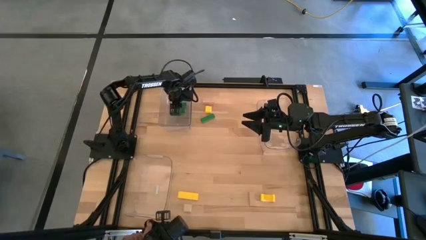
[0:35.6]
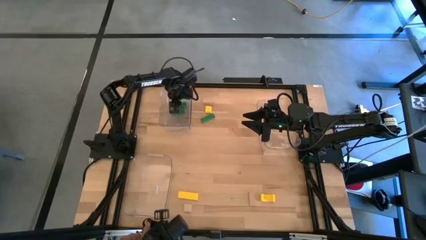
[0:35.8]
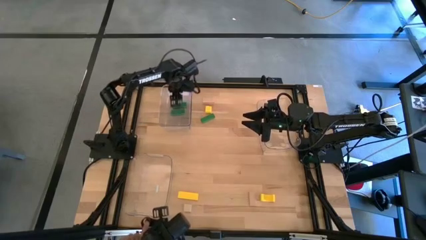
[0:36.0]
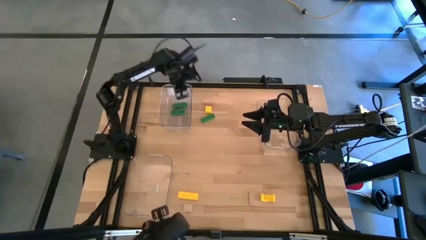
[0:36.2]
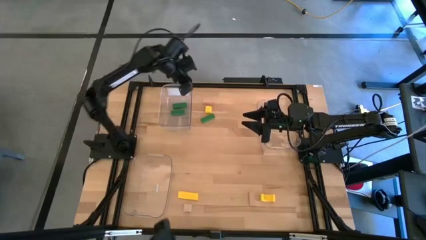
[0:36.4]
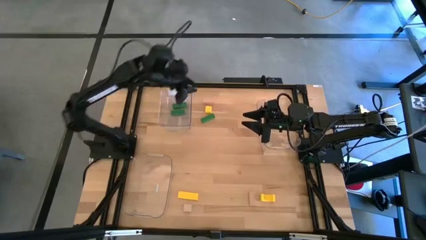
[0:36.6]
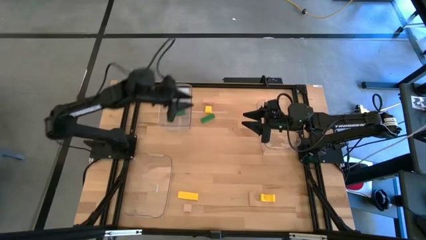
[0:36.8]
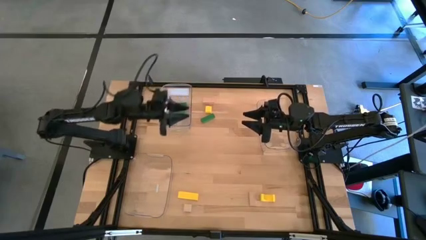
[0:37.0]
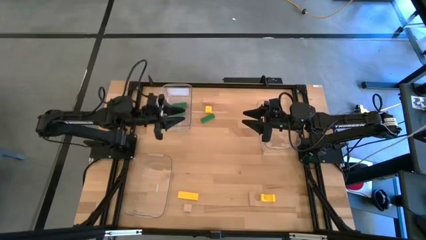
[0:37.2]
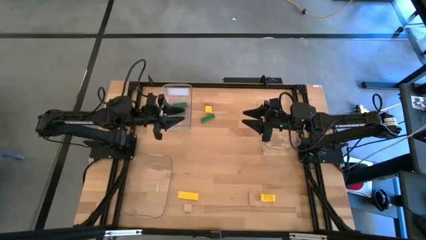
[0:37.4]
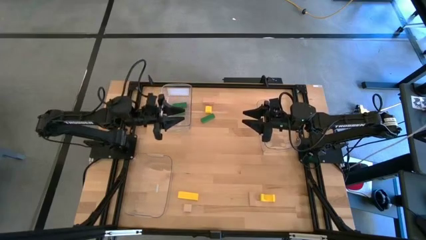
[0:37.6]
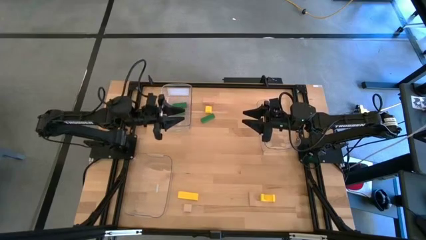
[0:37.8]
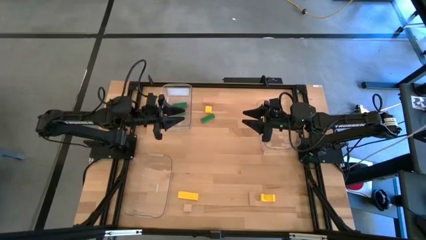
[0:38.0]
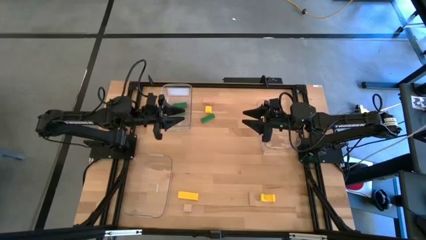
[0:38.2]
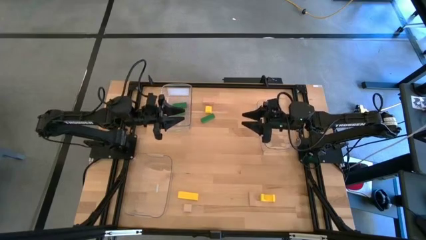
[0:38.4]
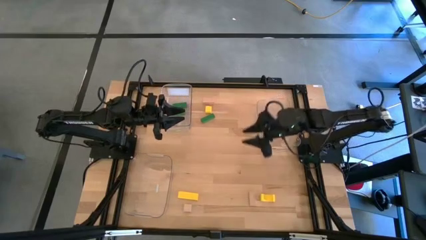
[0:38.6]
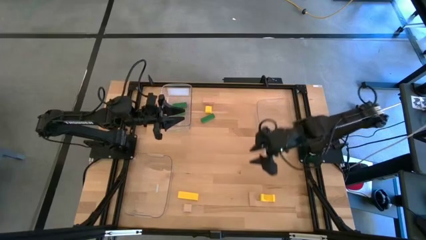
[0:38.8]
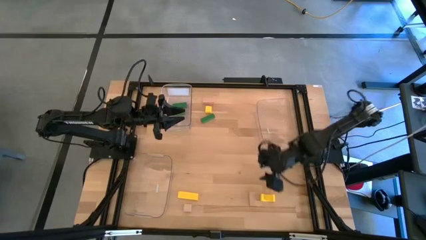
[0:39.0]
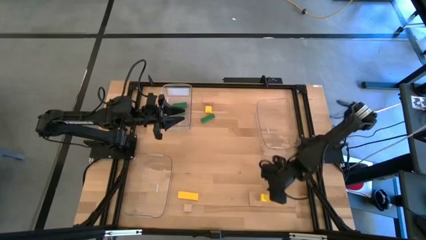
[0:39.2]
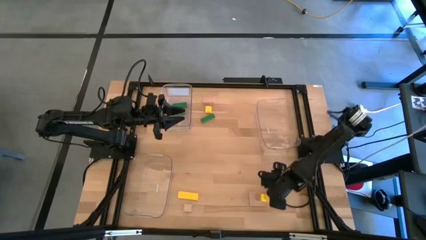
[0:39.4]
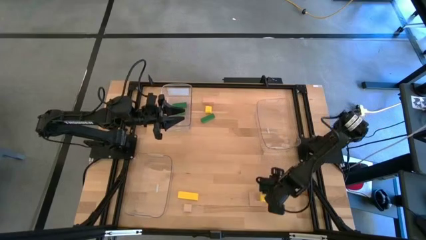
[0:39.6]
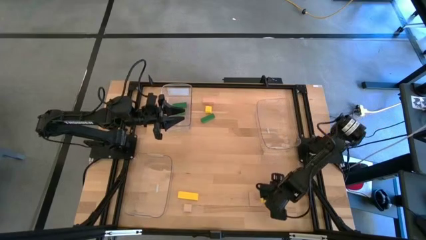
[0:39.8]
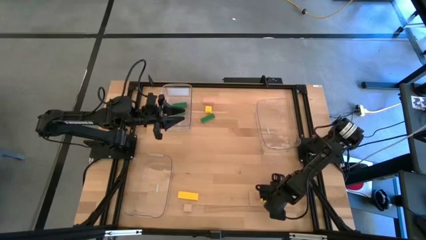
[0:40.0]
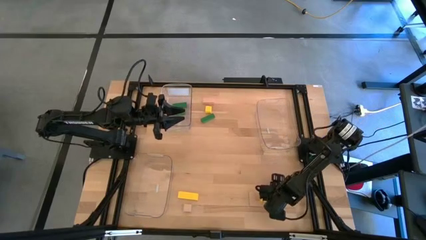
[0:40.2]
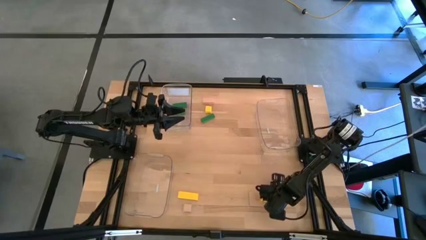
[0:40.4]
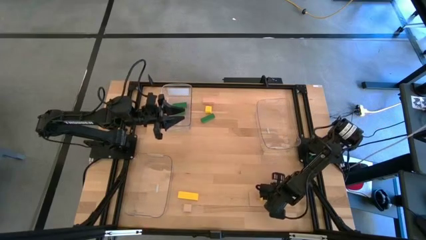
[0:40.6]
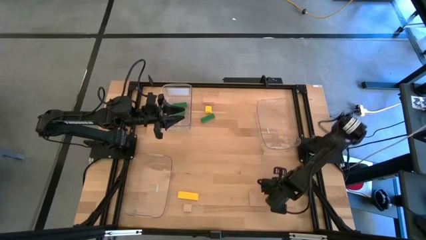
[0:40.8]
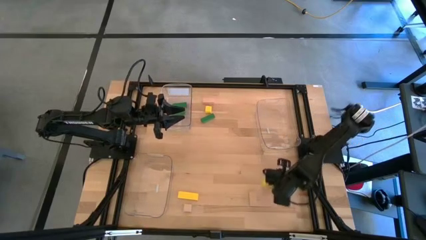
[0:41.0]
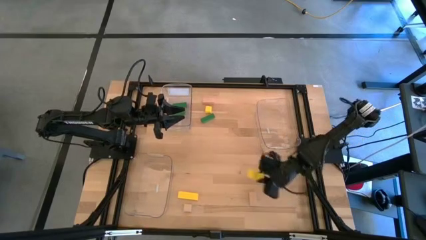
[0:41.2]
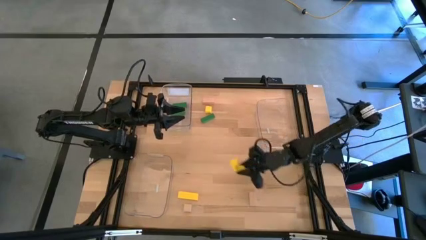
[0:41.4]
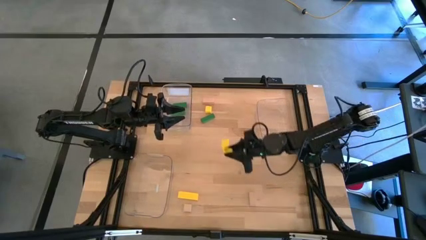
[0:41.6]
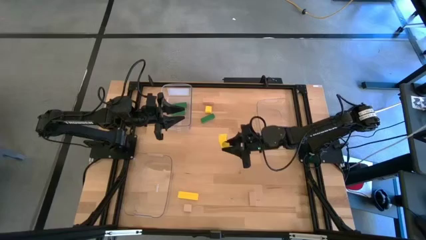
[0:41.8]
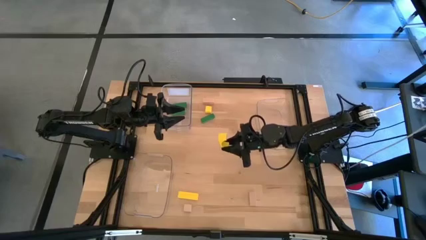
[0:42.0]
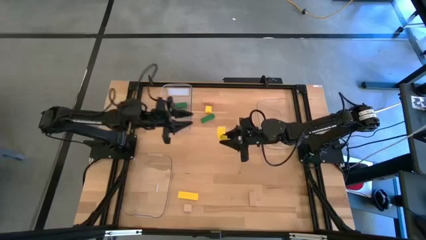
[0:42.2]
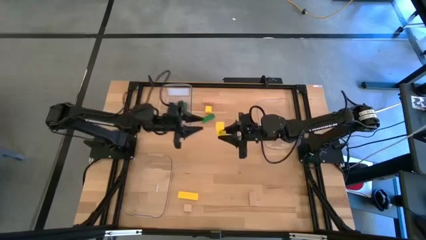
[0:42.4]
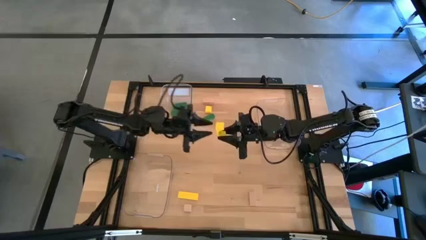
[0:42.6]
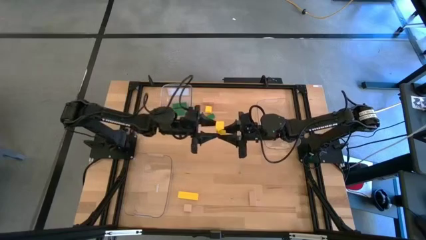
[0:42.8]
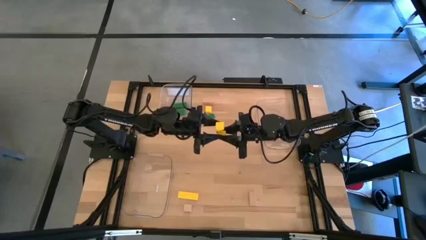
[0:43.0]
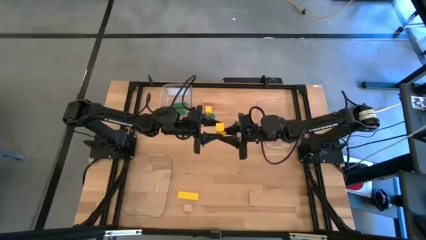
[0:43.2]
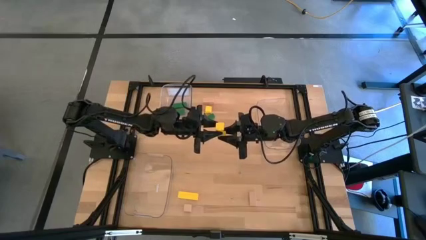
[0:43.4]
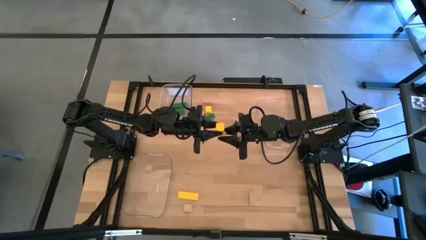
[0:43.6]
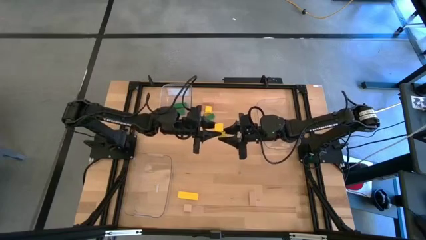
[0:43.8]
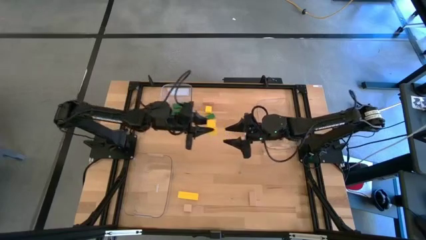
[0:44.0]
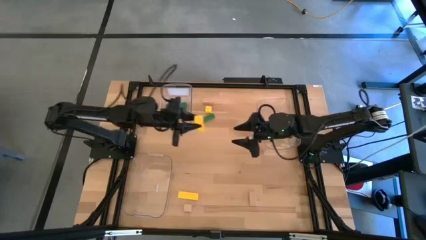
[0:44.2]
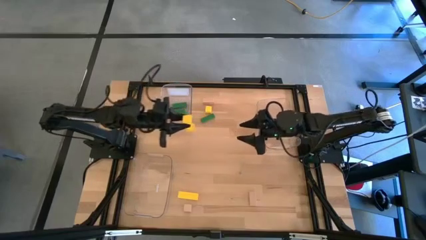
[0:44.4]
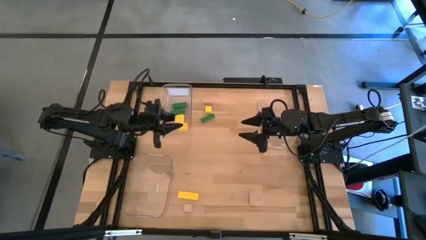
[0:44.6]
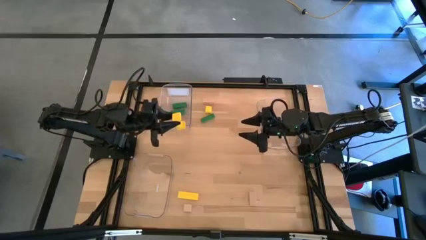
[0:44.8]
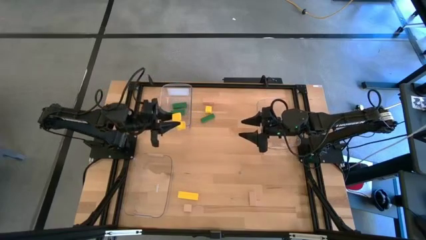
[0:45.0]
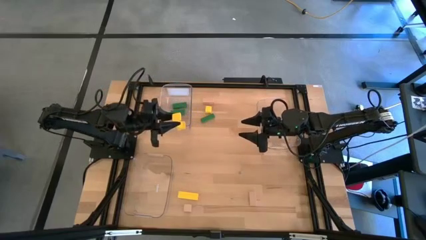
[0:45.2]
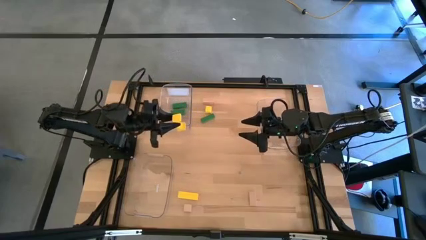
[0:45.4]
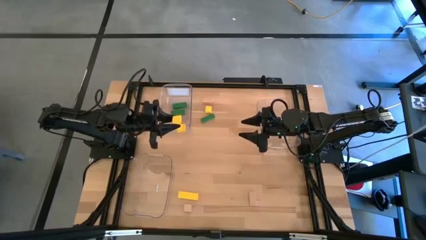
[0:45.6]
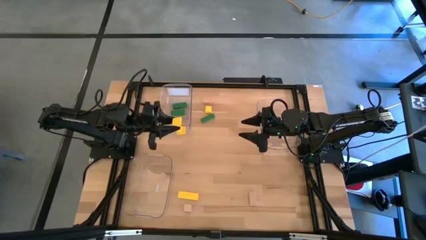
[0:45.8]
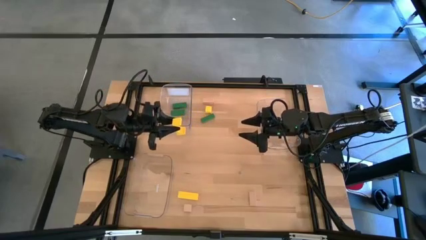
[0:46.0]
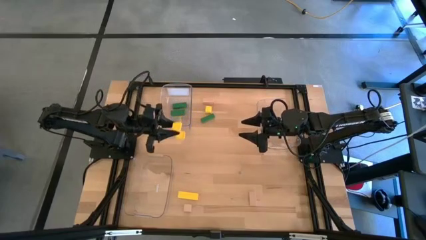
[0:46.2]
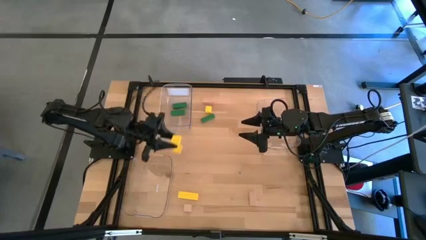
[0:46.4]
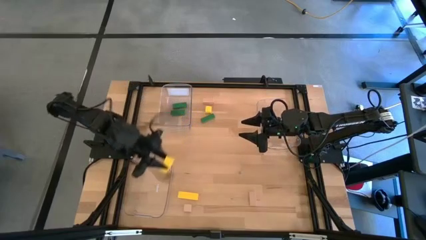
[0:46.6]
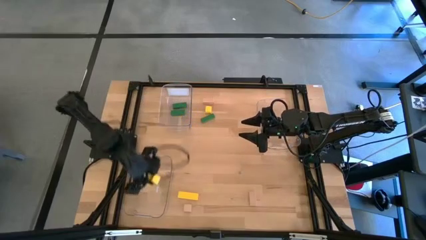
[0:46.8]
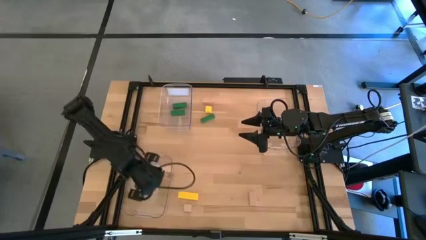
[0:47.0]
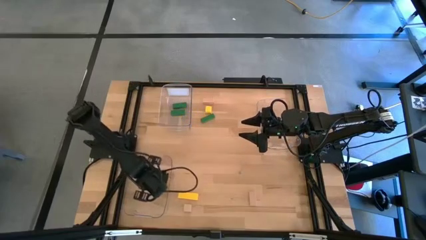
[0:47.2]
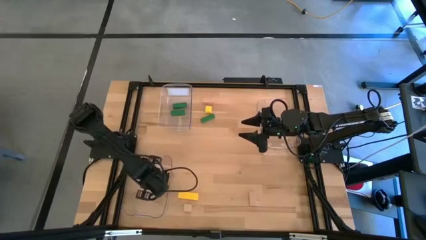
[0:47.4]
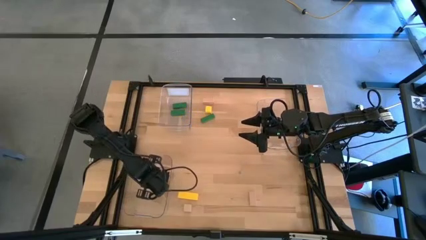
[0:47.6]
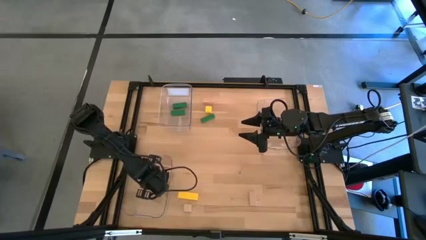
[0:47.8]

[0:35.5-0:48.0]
Task: Sort & place blocks by color
Put the bottom right yellow block into the bottom left transparent bin

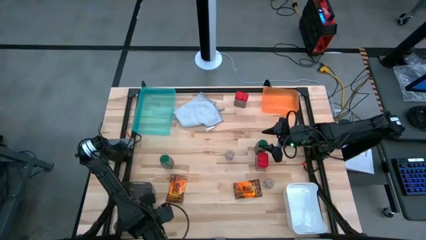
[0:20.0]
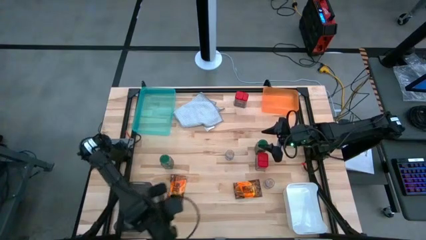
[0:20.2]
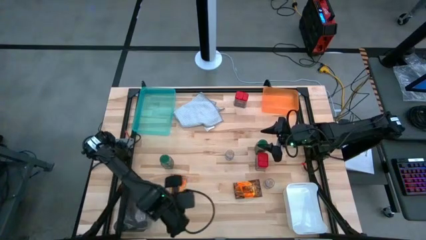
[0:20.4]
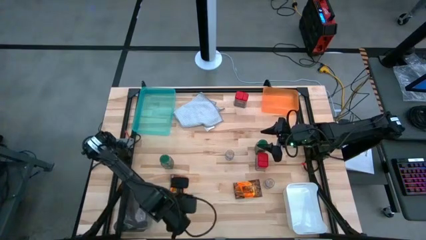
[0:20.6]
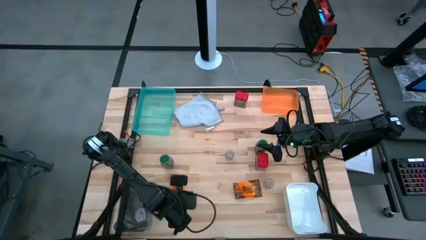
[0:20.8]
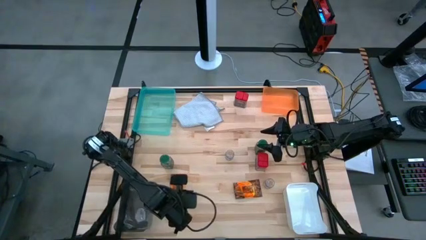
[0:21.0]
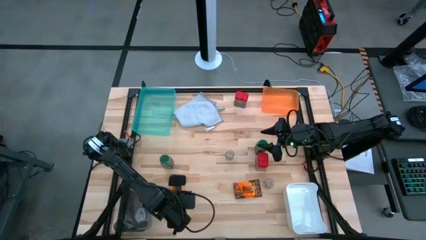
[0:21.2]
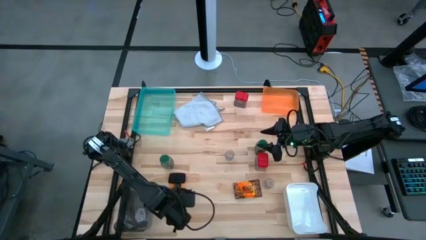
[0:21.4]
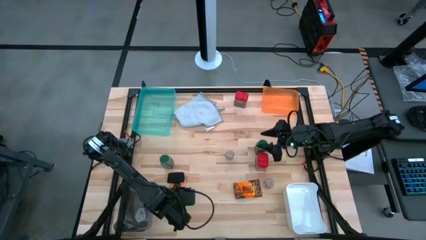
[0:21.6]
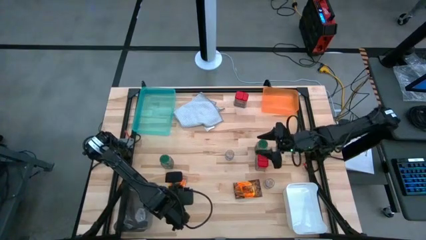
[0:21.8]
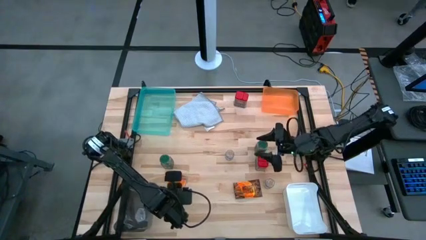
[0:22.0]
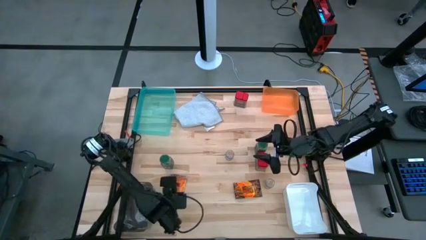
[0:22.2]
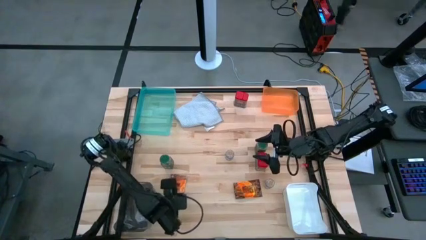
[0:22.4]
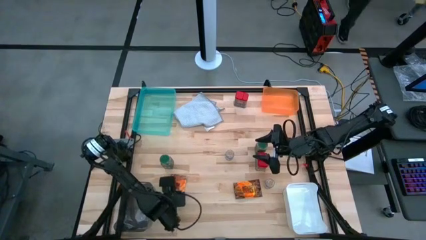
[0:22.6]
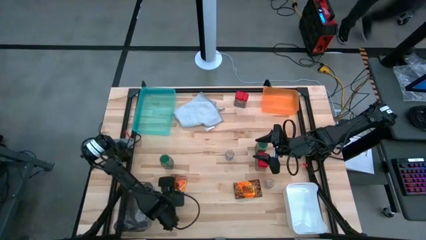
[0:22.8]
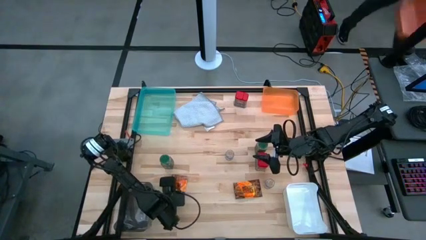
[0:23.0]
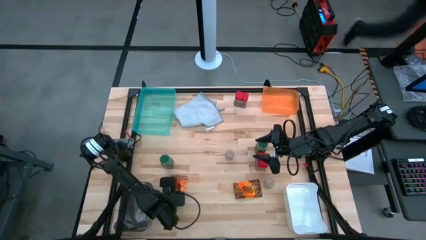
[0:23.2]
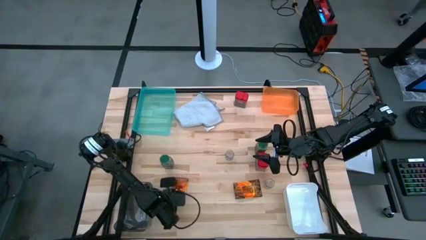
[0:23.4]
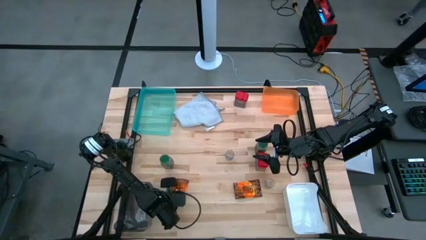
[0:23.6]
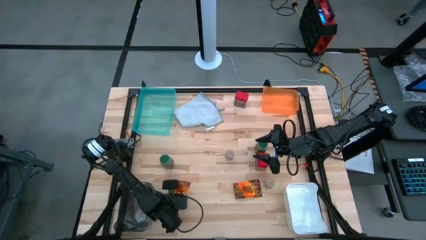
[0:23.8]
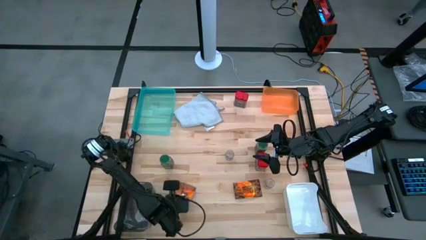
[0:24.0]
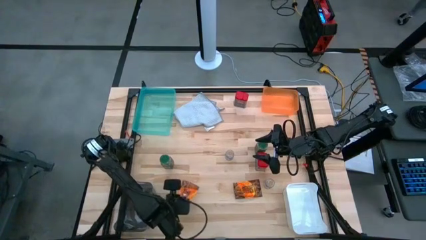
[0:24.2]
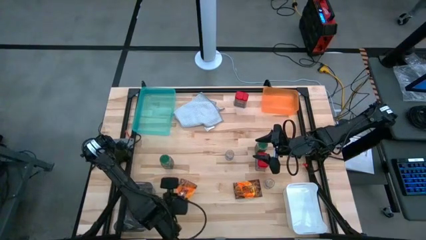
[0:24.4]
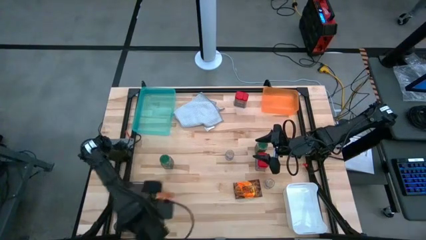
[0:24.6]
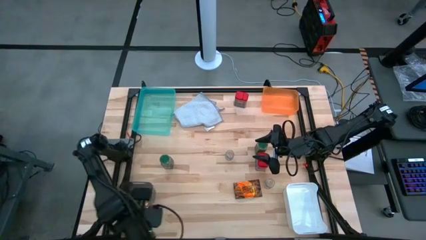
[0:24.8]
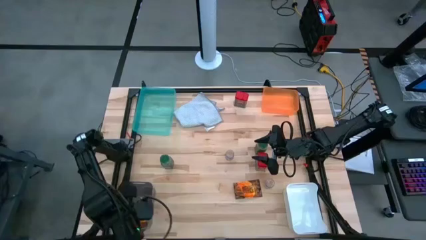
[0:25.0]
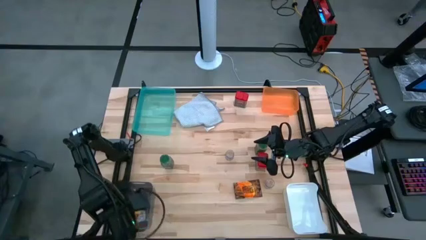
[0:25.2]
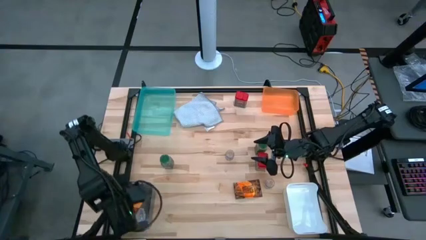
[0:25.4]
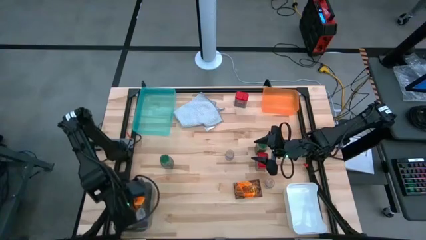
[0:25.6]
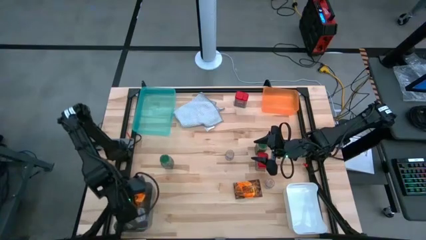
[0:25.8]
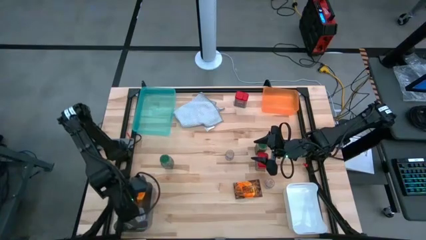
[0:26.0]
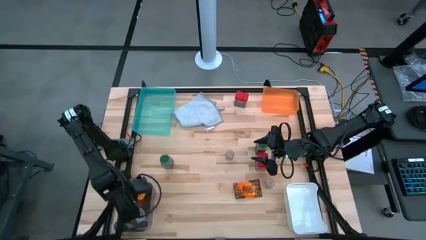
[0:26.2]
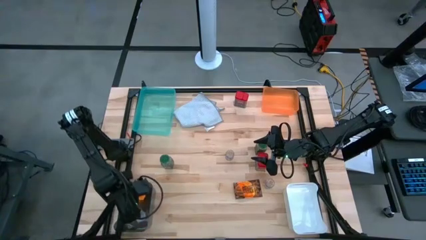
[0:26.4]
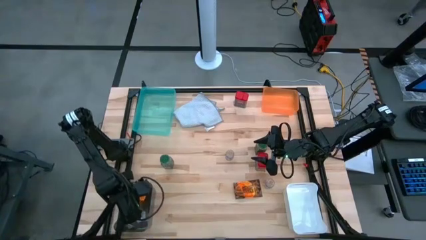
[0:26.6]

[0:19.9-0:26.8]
Task: Sort spices by type
Put the left orange seasoning pack into the black bin
